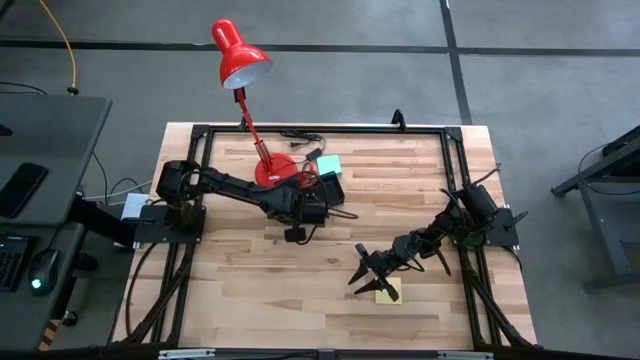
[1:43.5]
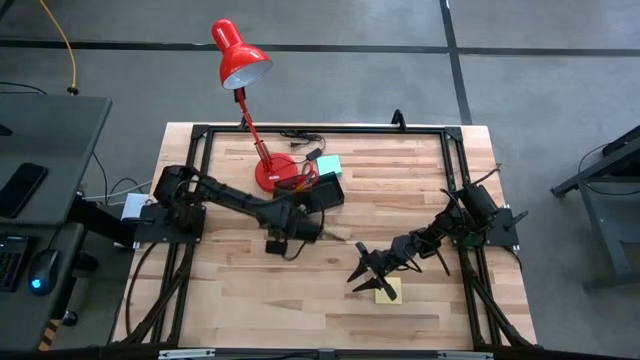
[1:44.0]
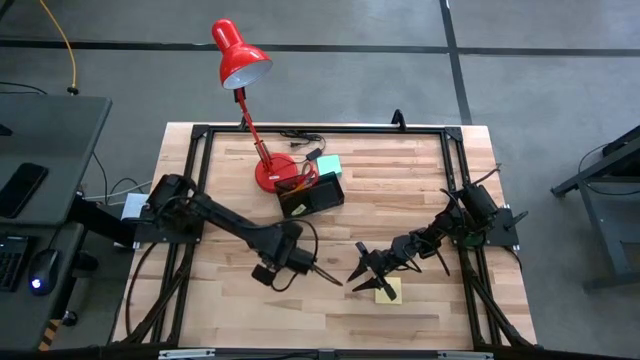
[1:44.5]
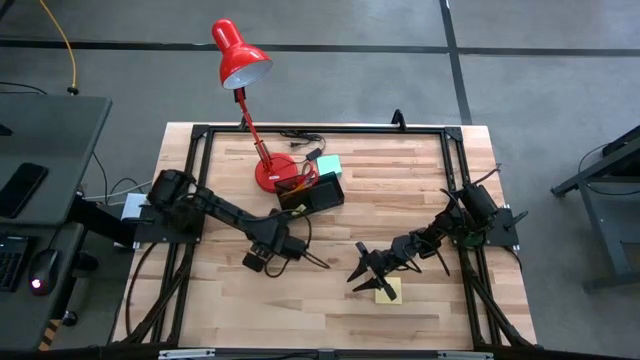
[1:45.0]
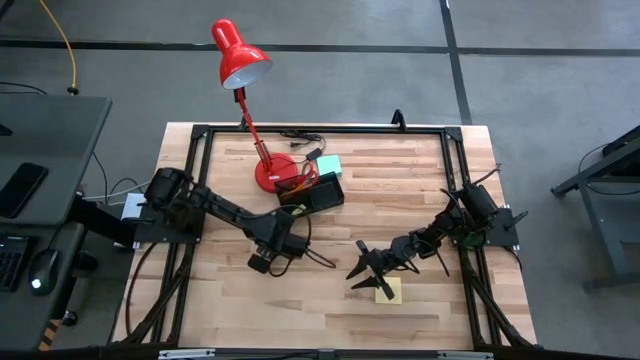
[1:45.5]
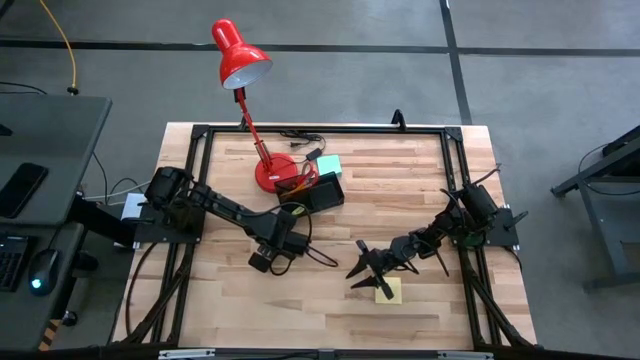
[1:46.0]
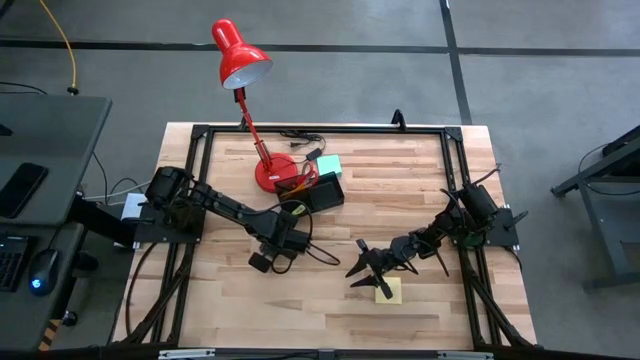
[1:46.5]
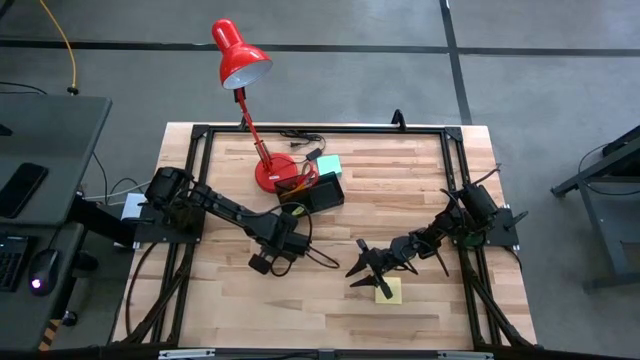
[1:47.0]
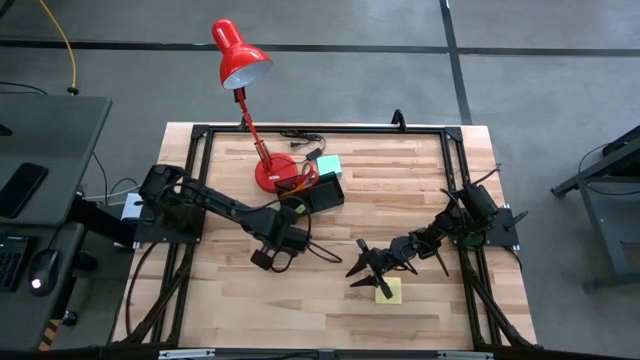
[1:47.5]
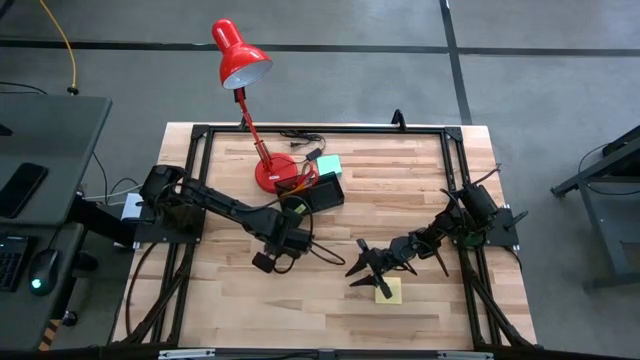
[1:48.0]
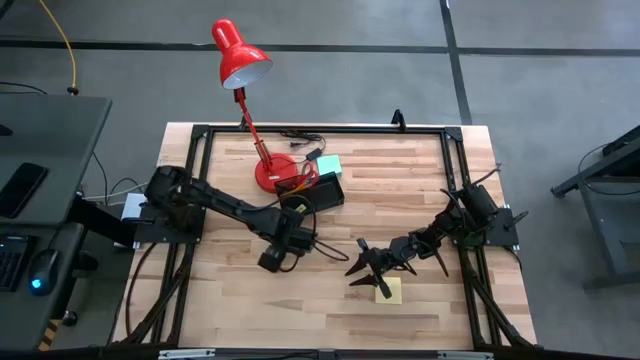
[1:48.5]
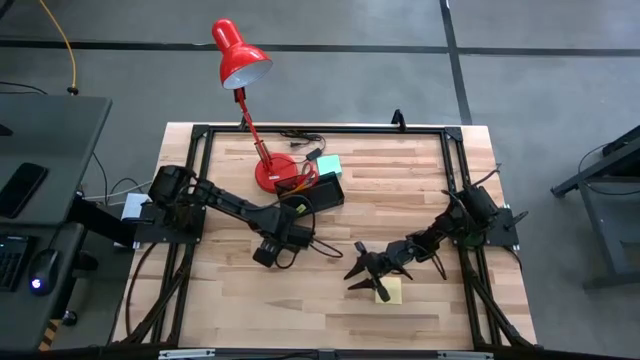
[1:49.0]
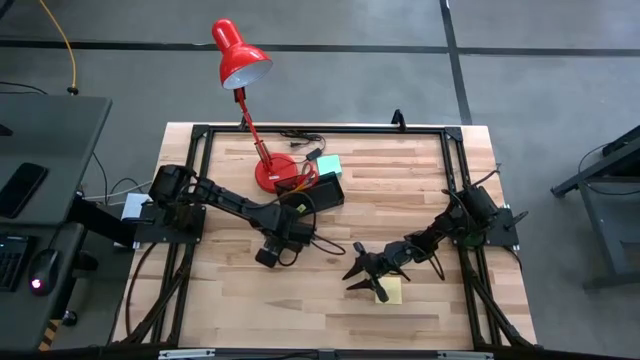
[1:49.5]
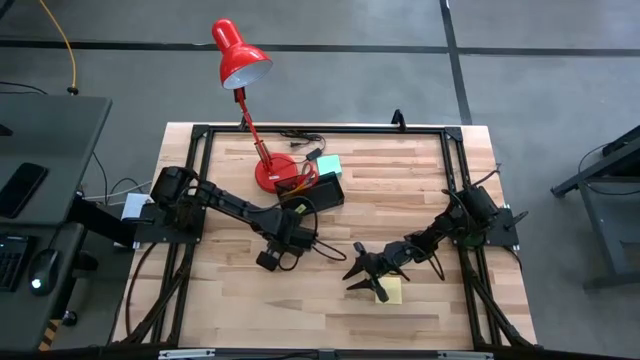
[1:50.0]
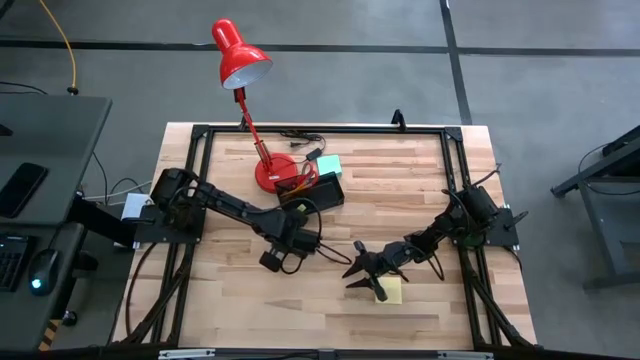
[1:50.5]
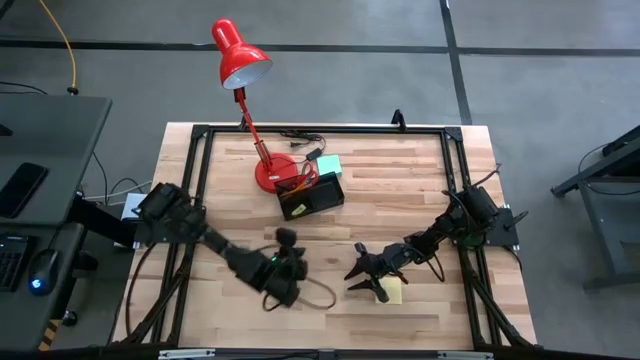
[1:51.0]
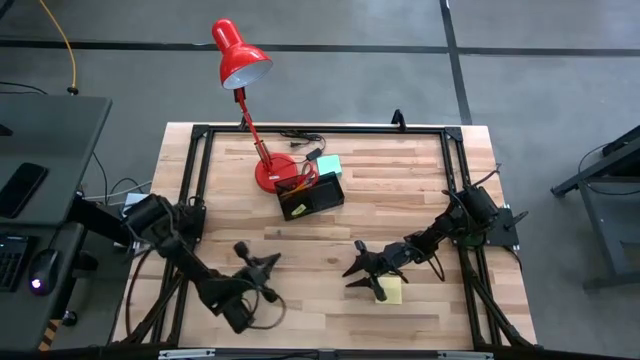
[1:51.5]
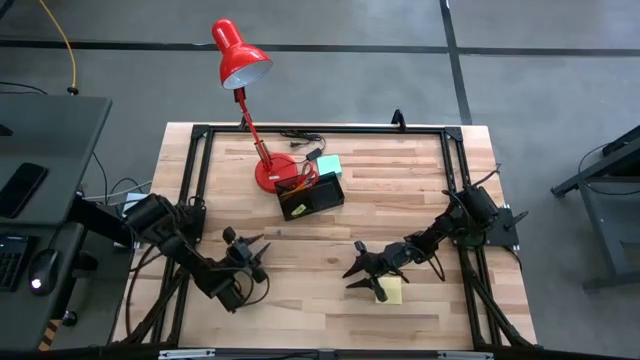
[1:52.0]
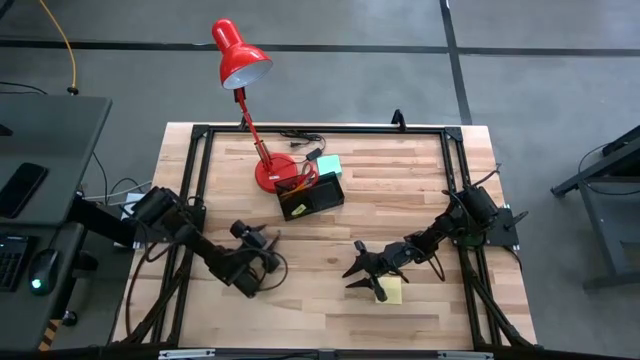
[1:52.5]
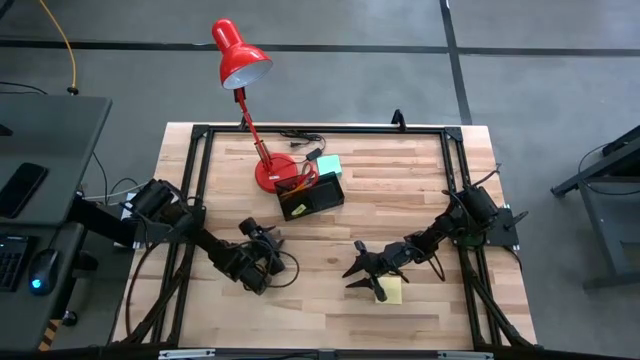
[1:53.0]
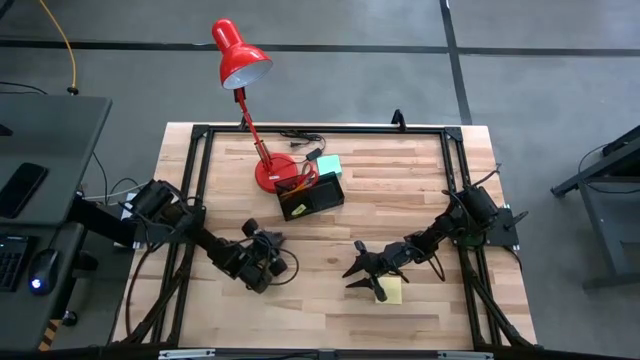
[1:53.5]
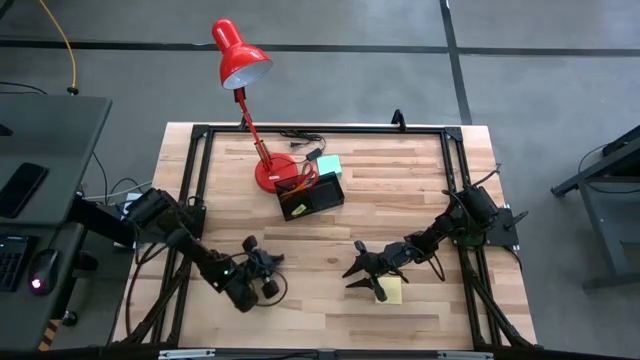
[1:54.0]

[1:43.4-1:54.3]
Task: Pick and place office supplies into organizer
Put the blue binder clip into the desk organizer

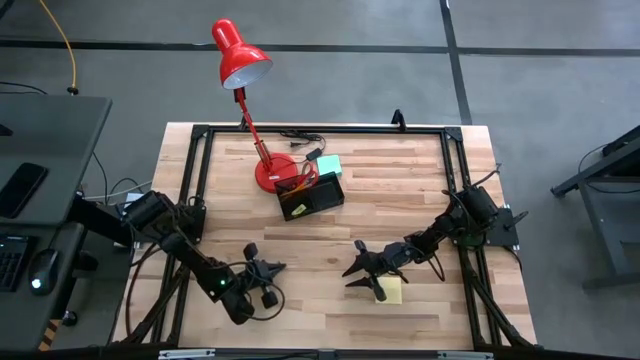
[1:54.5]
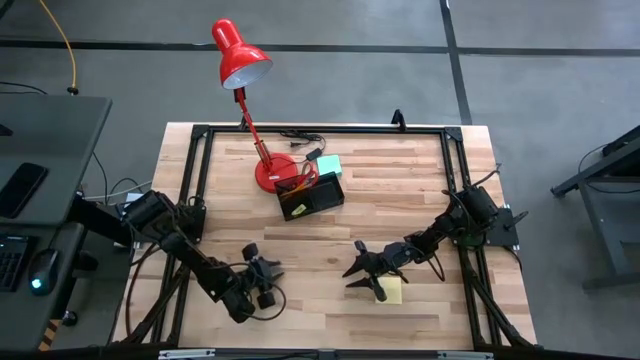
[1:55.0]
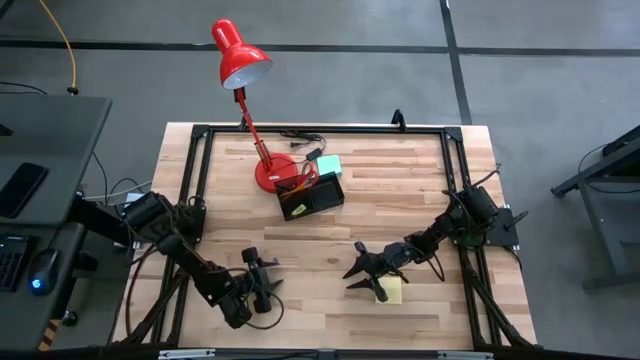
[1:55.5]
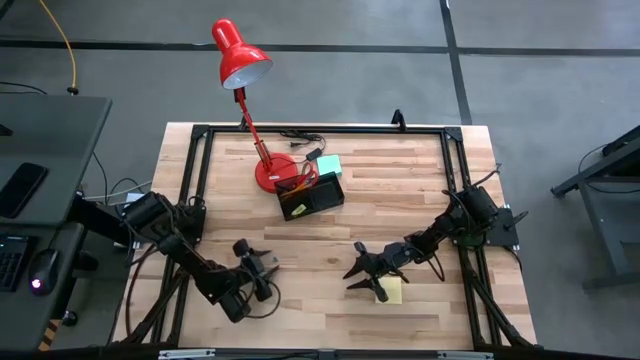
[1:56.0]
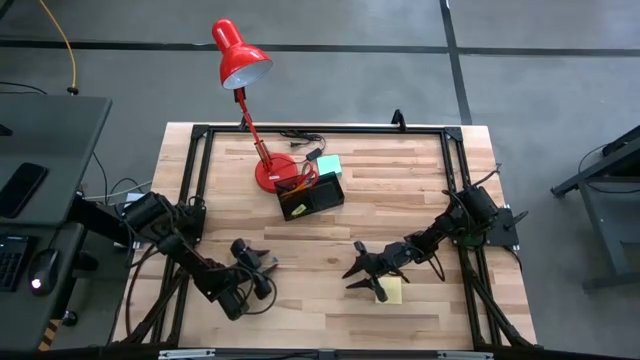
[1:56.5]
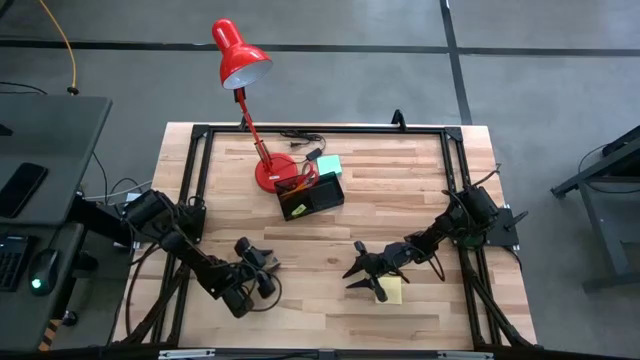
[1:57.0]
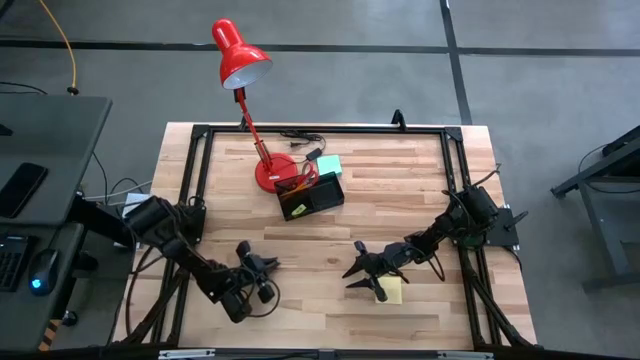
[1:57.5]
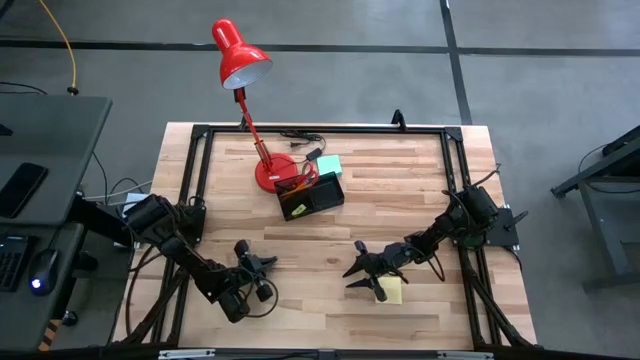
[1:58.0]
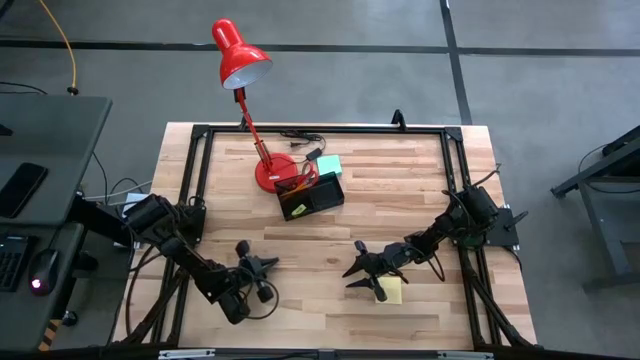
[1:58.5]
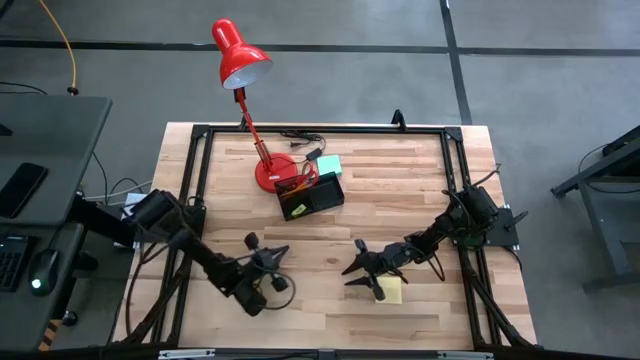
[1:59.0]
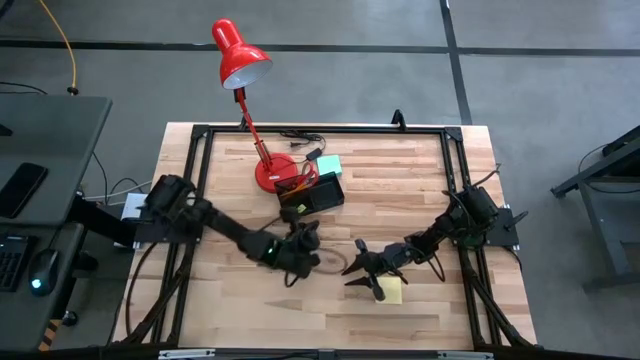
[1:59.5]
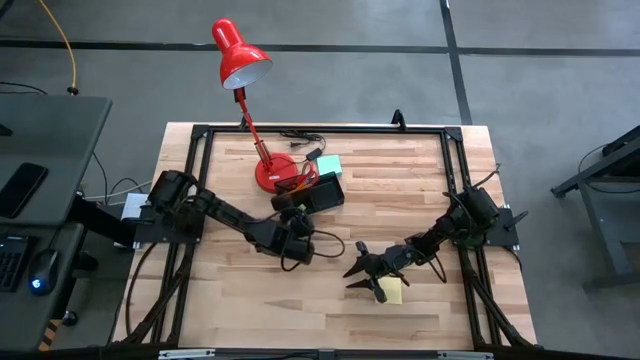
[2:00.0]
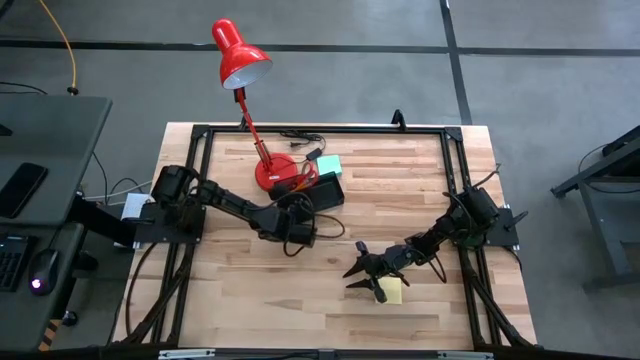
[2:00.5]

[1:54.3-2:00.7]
Put the blue binder clip into the desk organizer

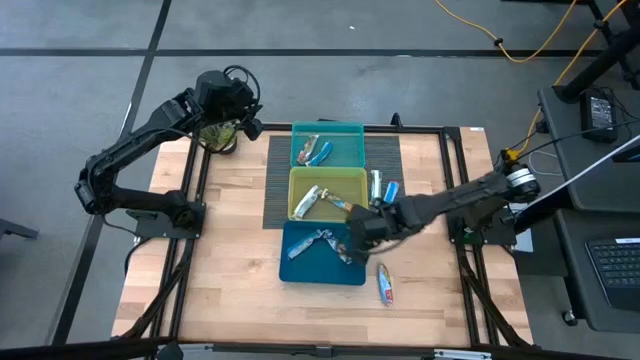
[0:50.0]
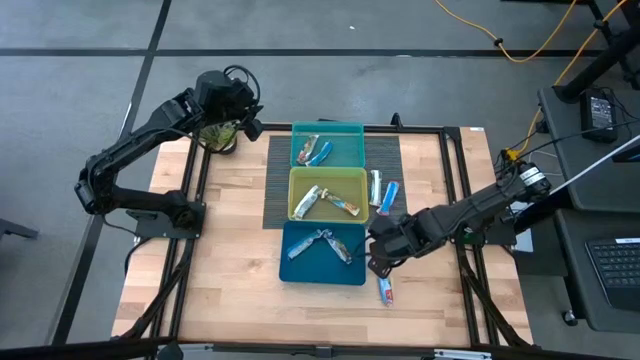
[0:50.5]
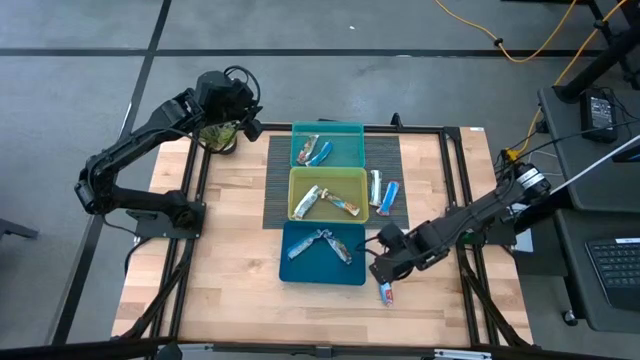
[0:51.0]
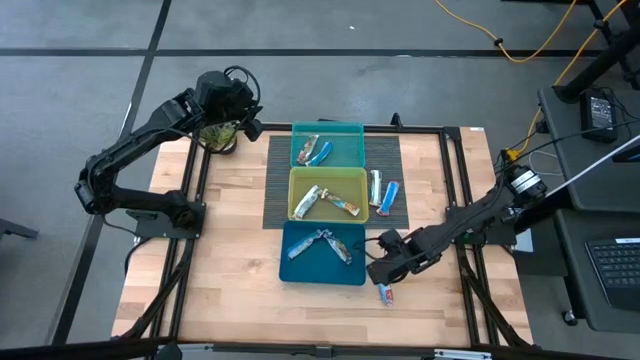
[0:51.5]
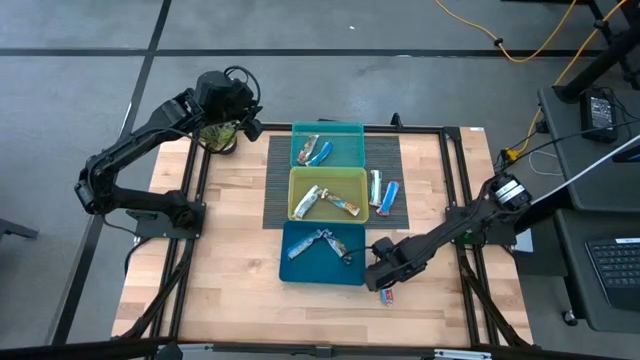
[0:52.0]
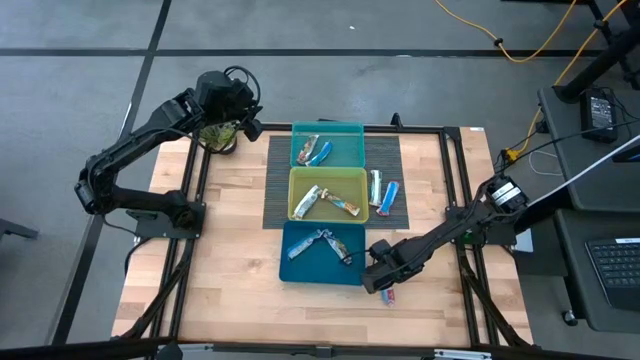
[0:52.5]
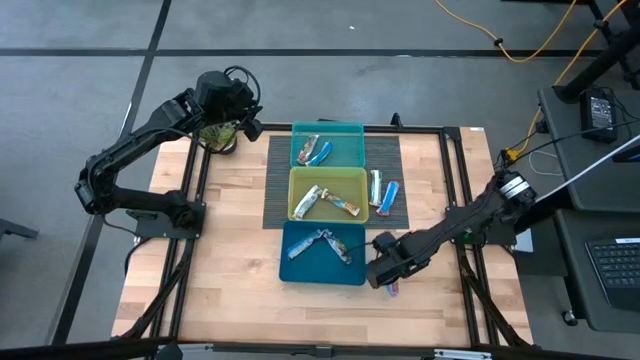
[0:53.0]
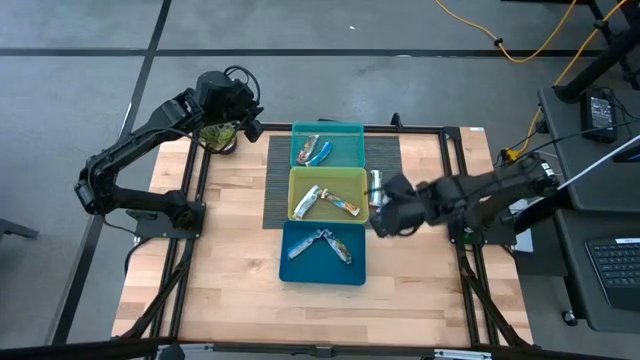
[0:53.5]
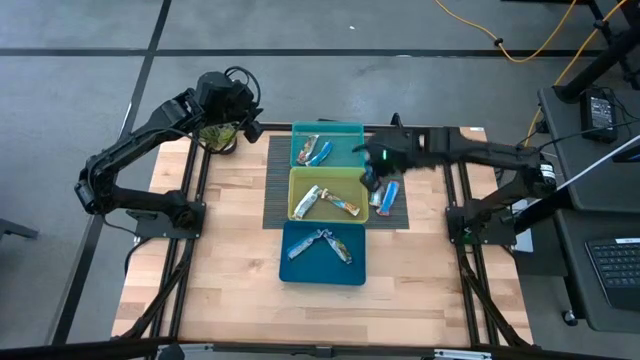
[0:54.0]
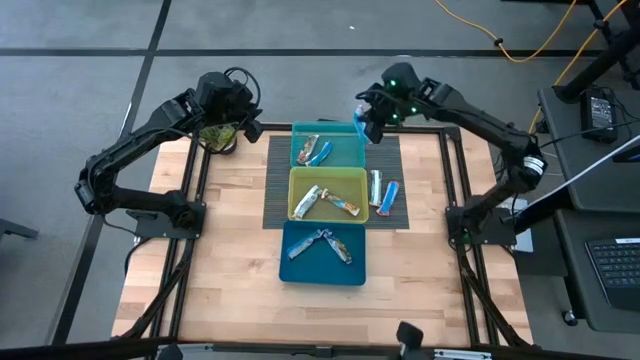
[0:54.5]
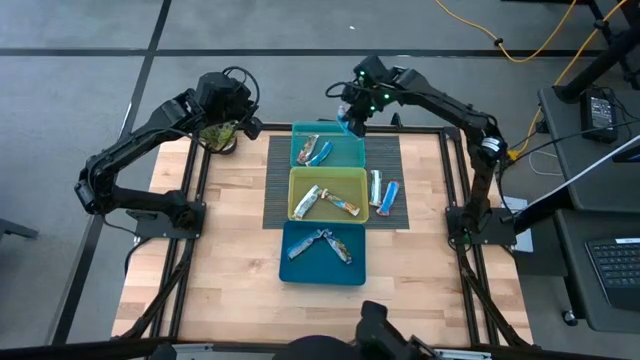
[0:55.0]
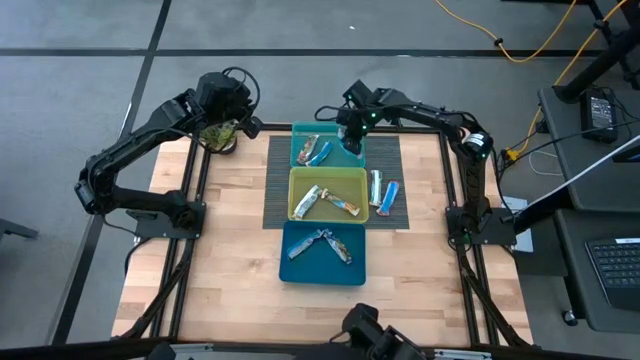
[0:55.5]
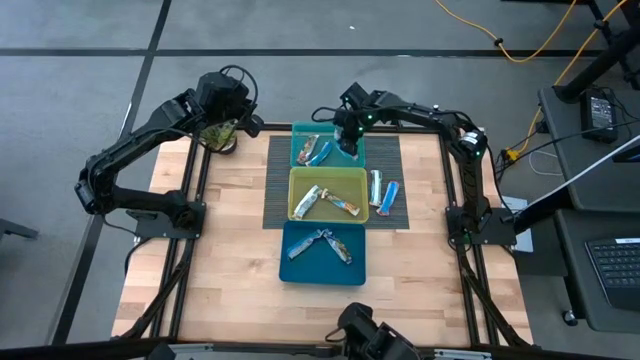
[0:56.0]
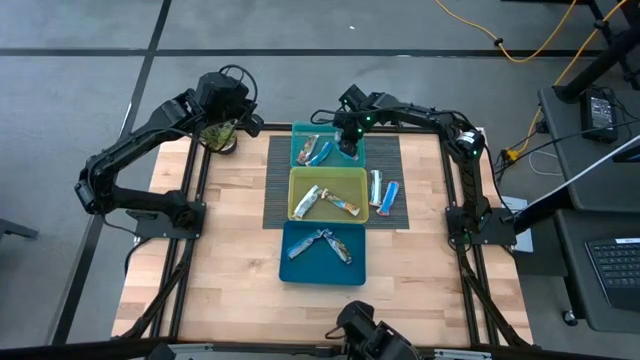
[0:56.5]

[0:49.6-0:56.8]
Task: Pick and place Granola Bars by type
Put the red granola bar into the green bin
